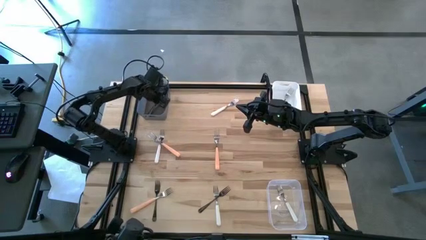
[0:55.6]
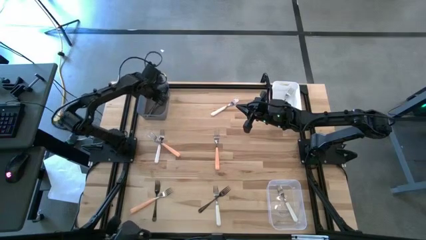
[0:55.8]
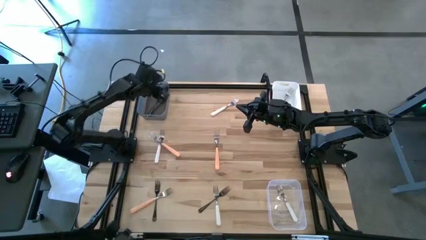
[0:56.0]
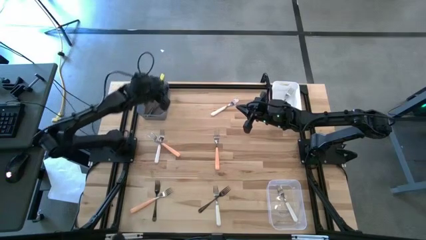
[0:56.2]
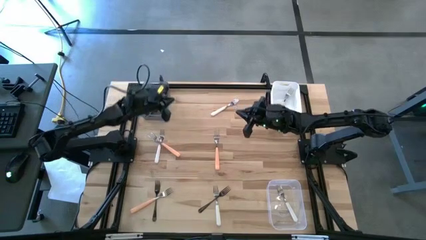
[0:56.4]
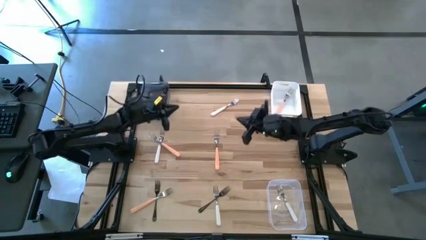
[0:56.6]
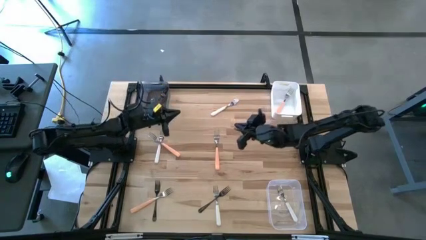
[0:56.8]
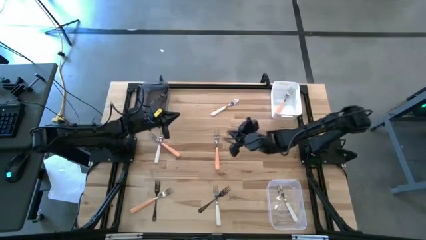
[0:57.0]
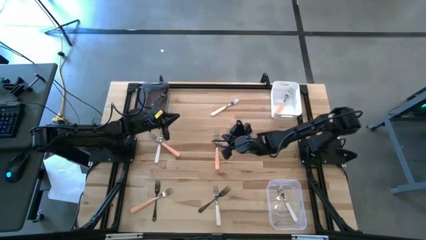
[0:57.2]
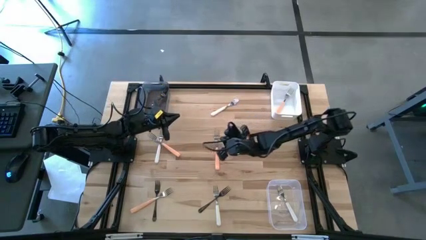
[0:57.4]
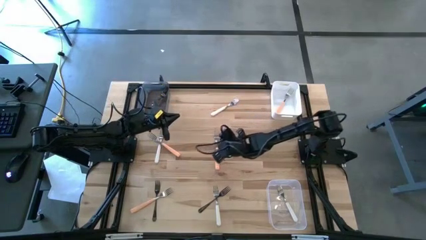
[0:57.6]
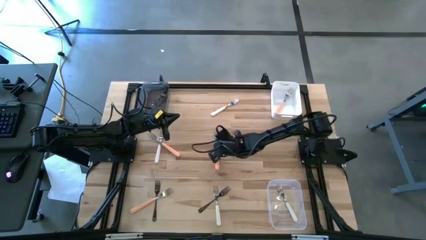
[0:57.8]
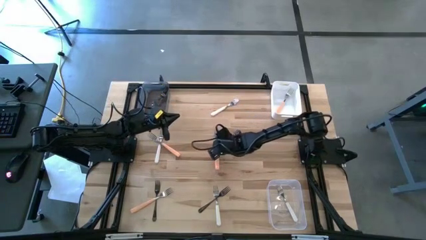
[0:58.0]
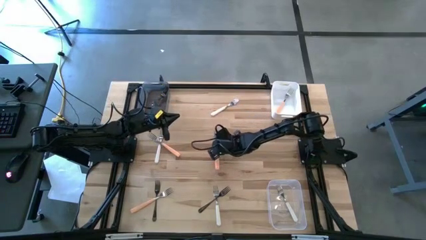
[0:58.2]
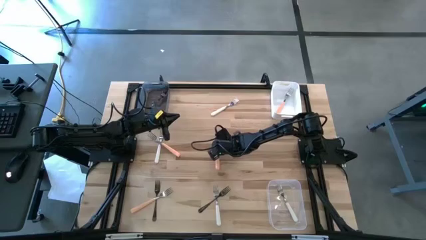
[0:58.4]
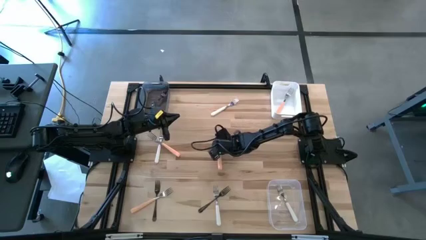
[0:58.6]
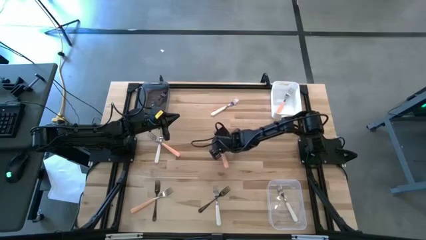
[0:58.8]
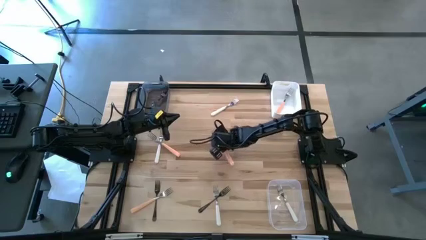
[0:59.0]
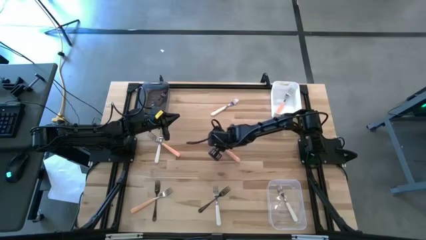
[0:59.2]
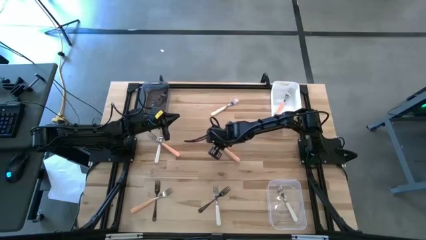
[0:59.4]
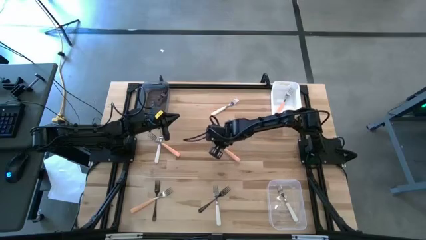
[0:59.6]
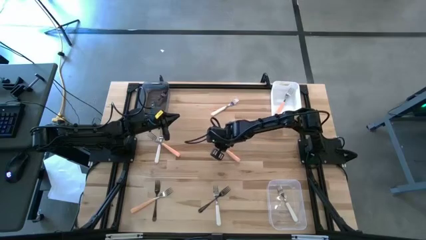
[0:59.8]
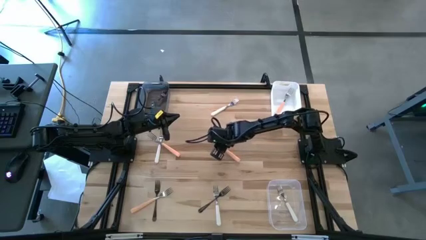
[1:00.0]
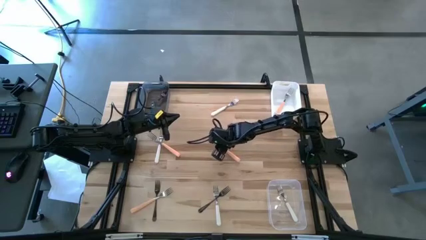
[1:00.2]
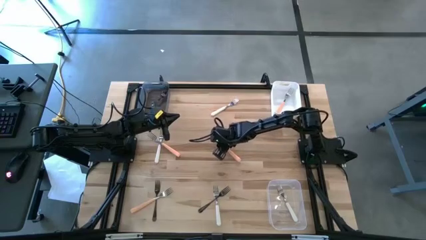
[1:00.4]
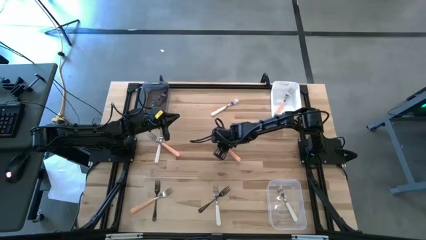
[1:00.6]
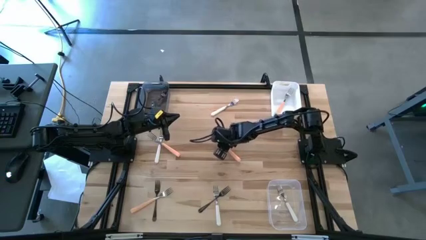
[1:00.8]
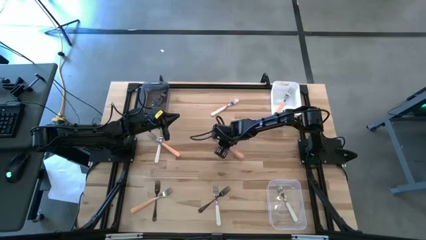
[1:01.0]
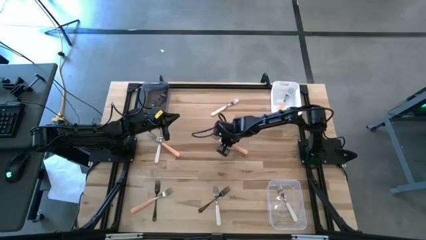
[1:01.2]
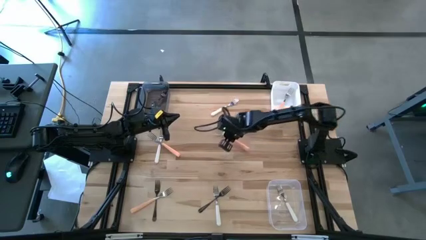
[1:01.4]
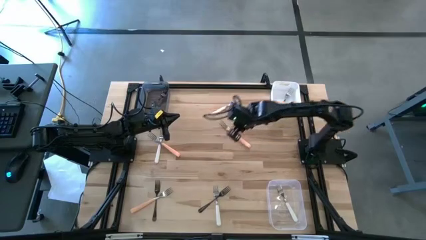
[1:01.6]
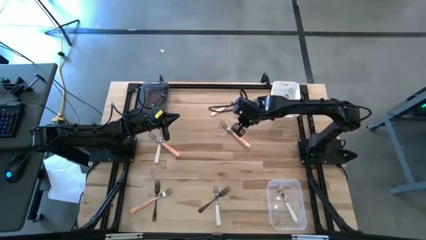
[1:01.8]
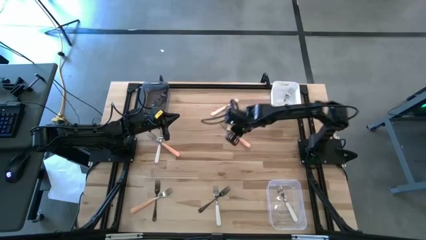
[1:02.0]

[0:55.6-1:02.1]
Task: Sort silverware by color (type)
Put the top right orange fork into the white bin

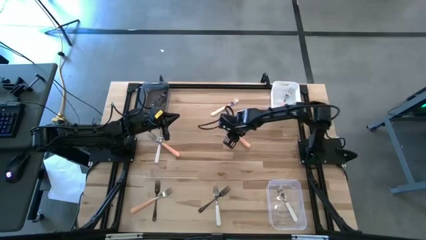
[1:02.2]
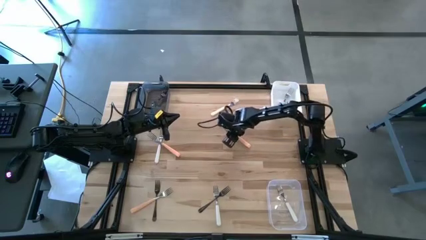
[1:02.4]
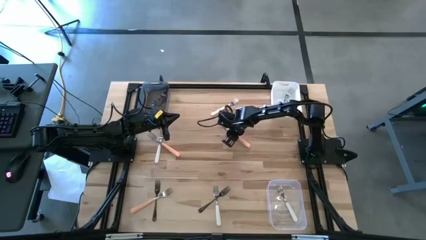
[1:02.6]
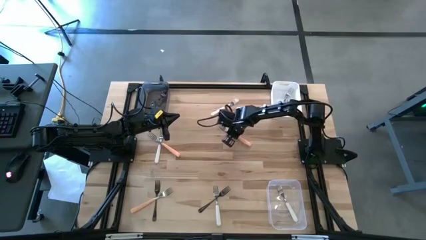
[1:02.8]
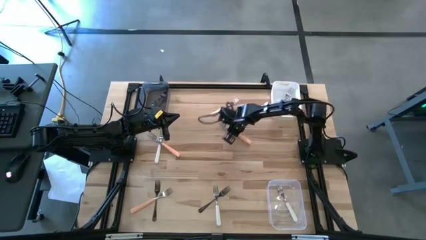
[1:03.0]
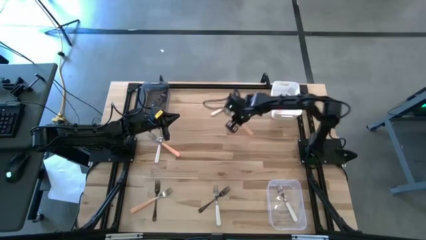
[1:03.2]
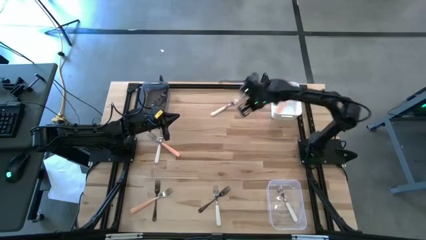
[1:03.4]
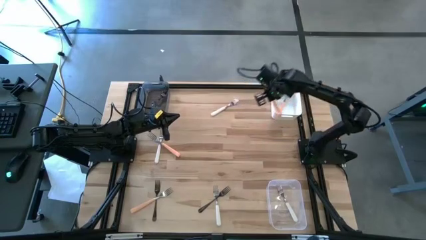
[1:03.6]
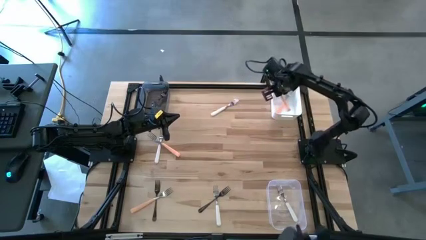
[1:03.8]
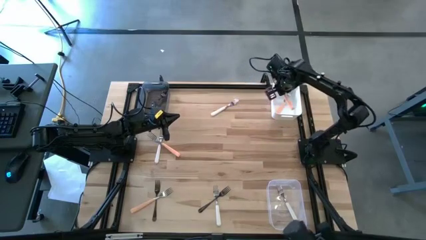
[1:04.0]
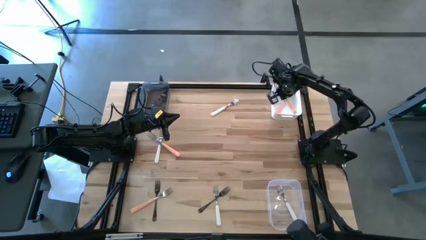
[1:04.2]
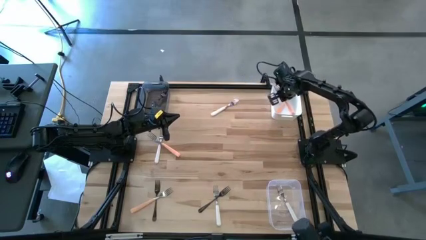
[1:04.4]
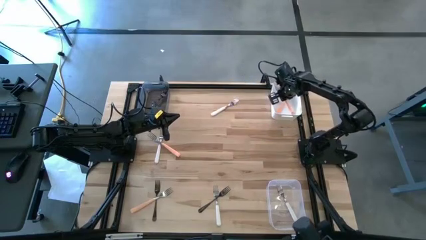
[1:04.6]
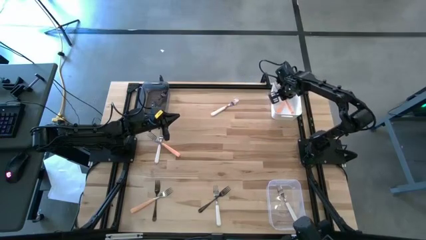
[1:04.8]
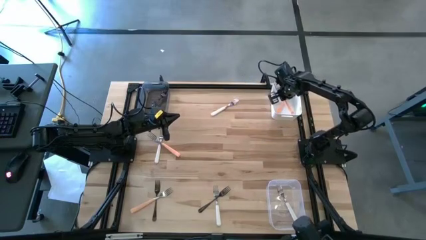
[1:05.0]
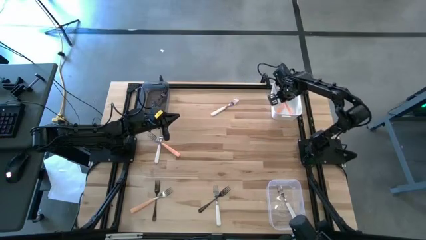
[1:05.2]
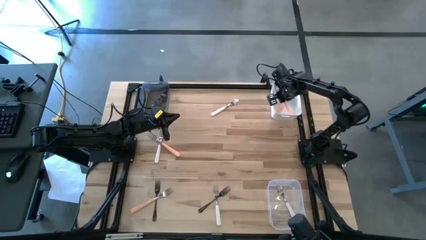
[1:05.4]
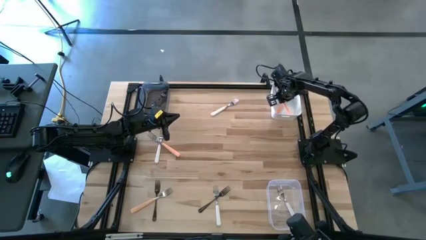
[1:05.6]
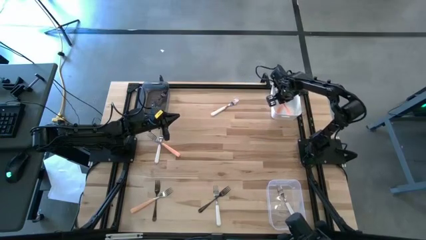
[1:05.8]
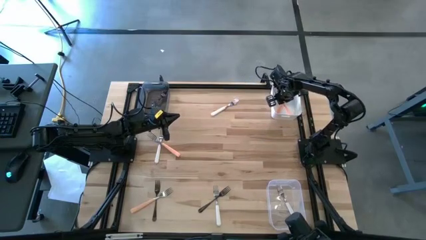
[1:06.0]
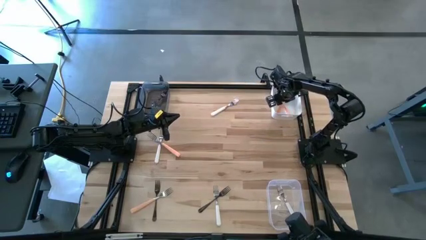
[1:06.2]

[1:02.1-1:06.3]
Put the top right orange fork into the white bin
